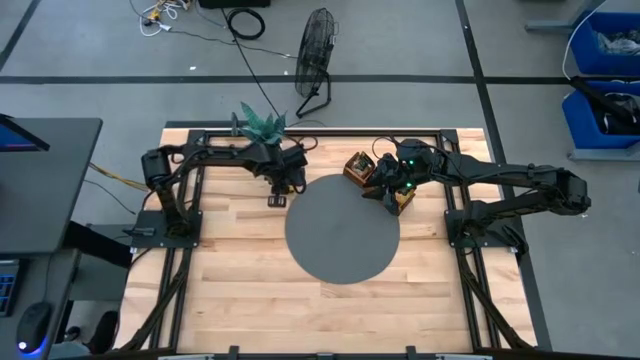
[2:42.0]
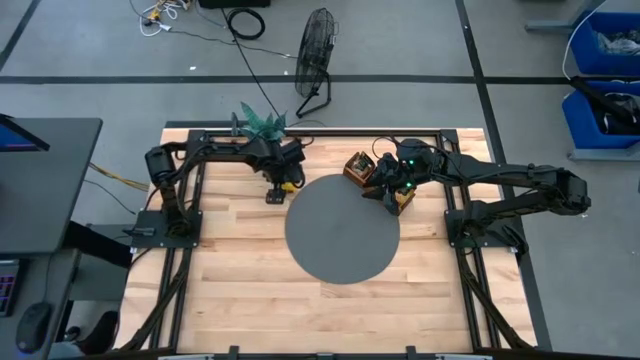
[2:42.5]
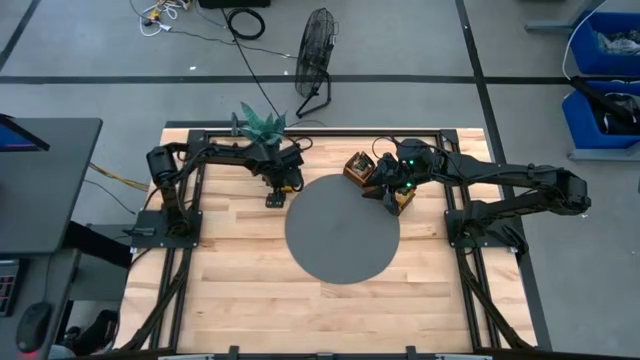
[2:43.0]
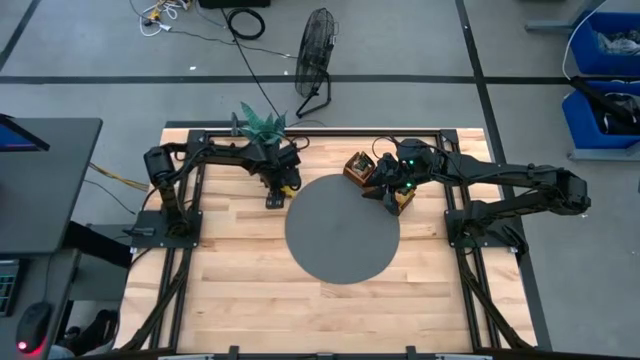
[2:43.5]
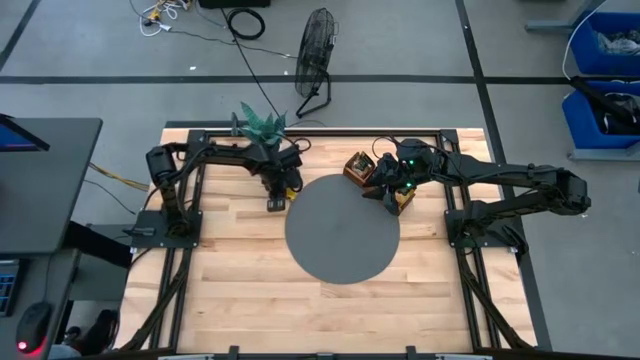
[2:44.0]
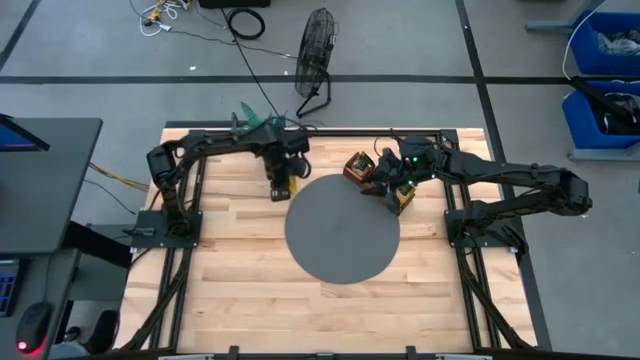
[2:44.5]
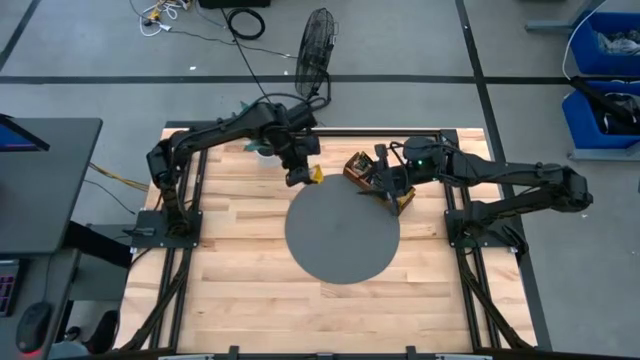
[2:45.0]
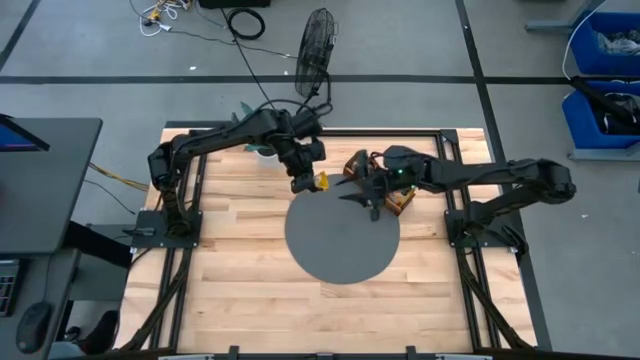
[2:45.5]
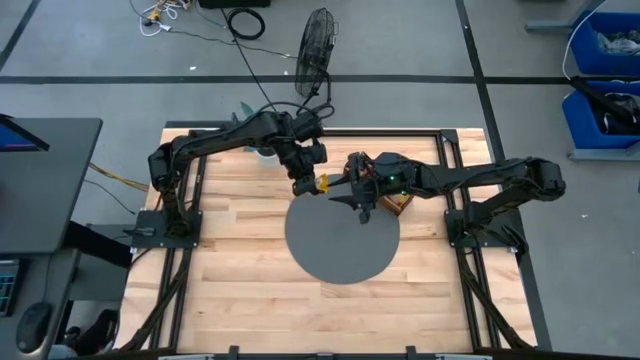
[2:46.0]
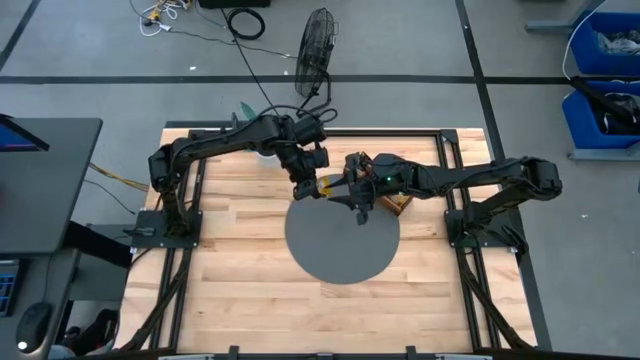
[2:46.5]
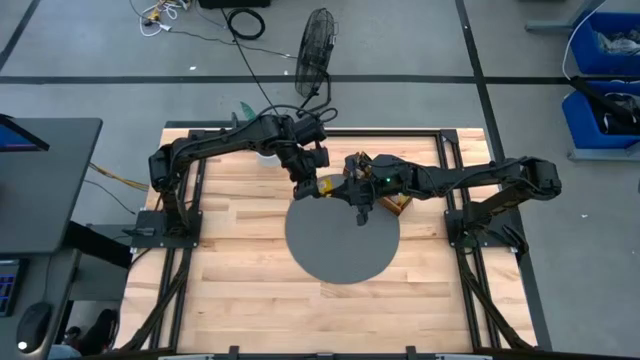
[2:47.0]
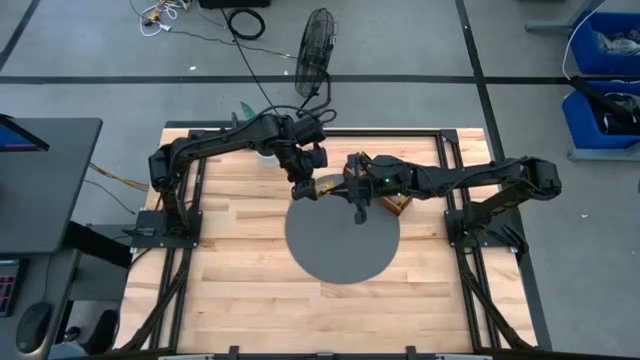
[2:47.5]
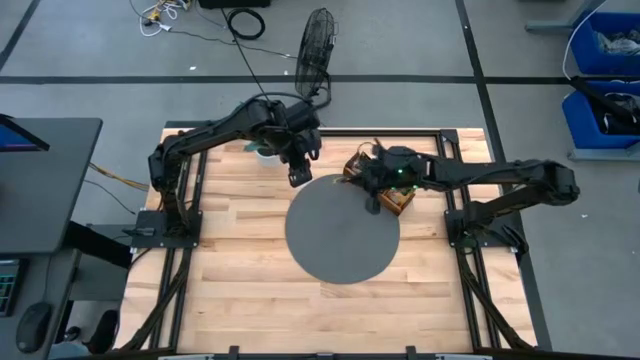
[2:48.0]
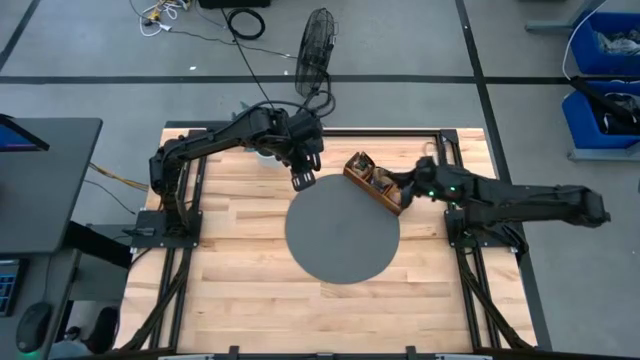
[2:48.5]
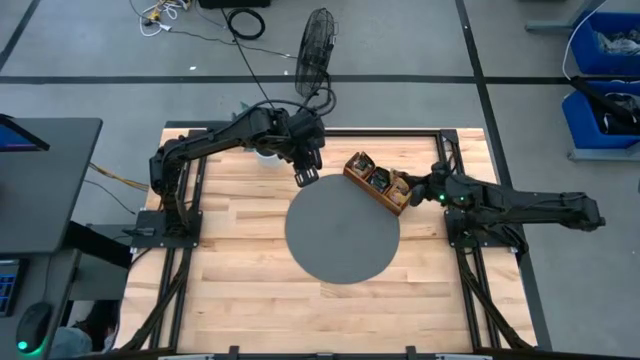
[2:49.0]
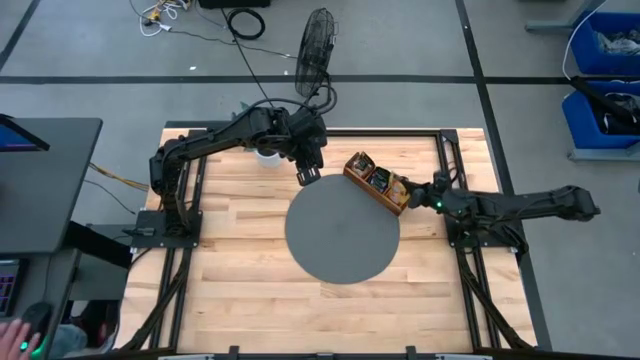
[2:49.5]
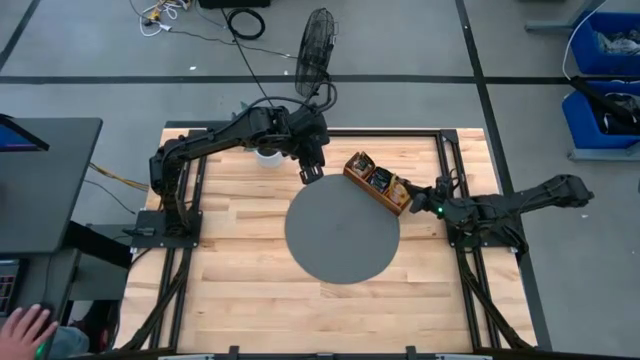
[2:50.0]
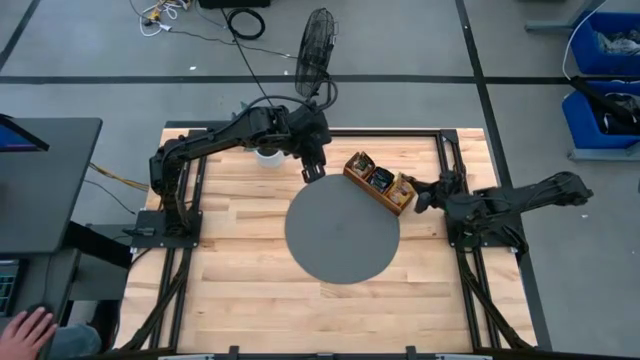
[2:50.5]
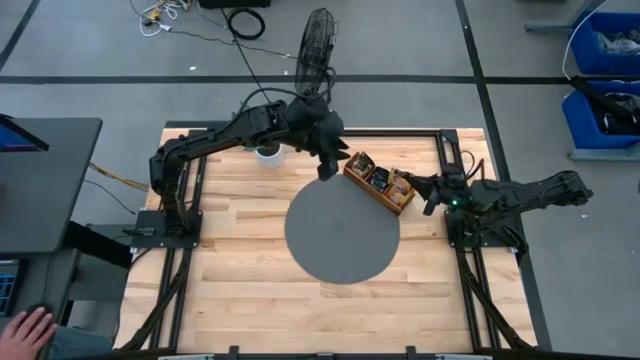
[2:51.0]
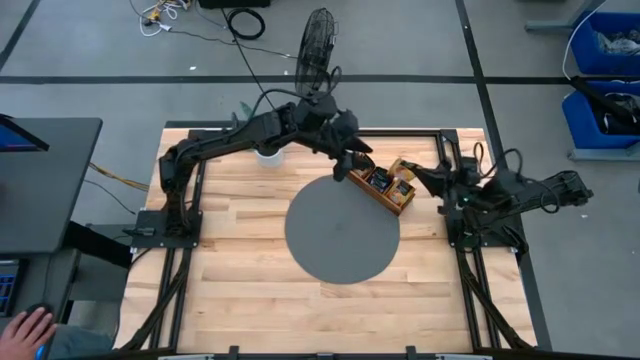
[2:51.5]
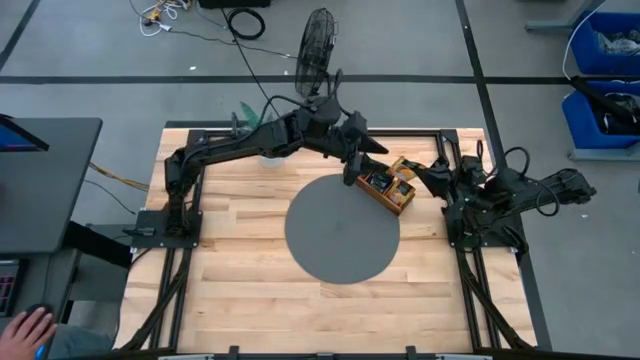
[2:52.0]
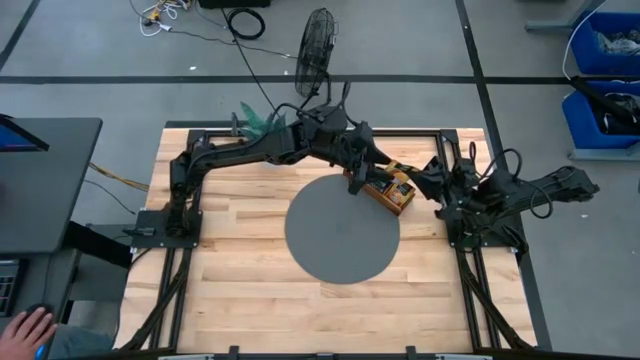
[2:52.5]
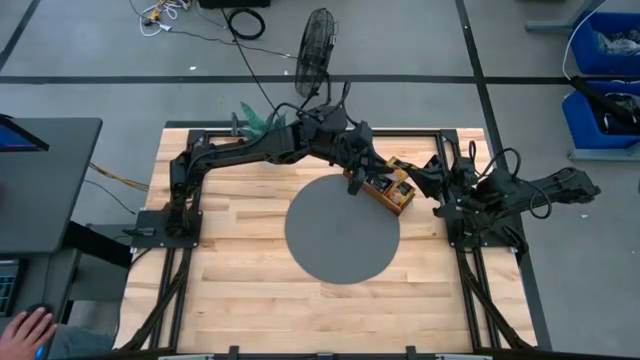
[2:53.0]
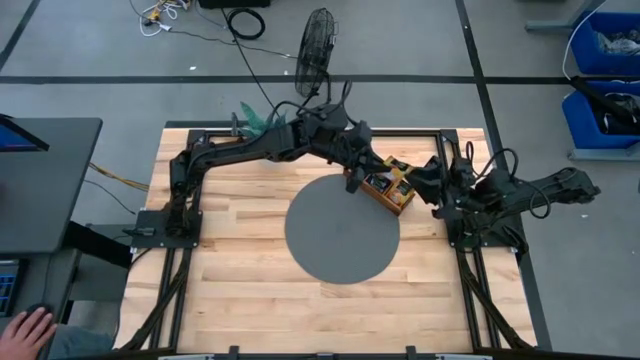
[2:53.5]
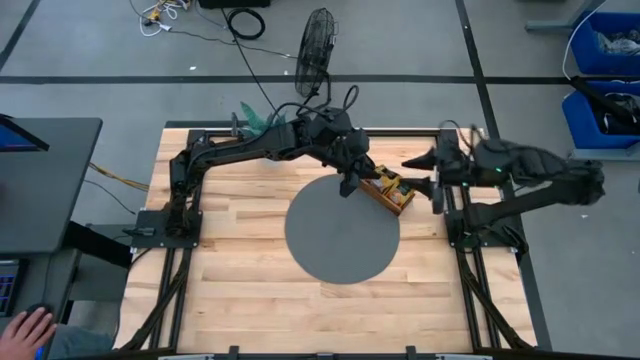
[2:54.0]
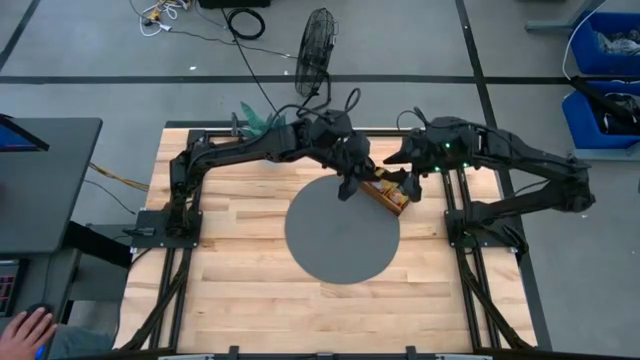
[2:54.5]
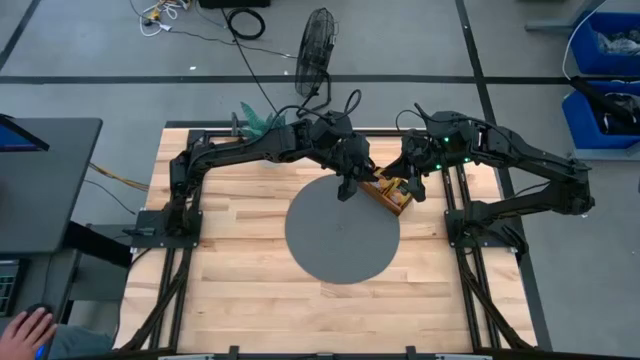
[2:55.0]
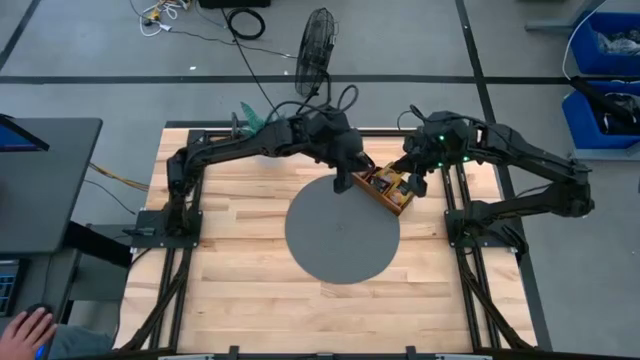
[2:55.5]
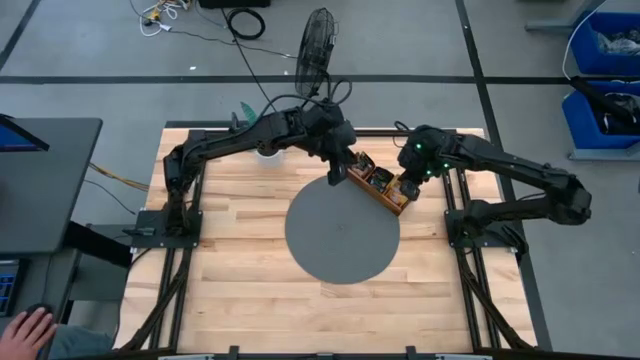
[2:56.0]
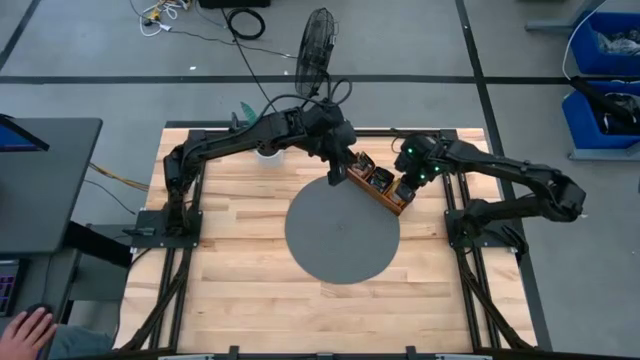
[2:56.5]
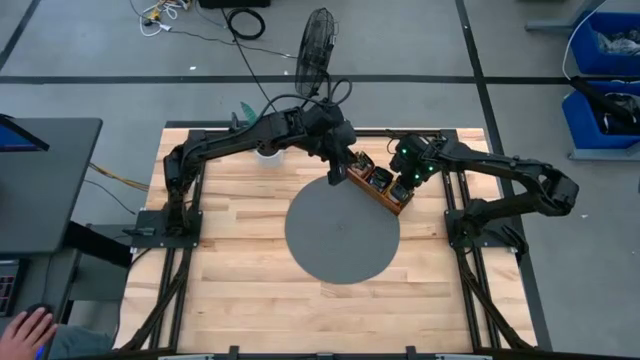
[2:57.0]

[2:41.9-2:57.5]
Task: Pick & Place Tea
Put the yellow tea bag into the right section of the wooden organizer

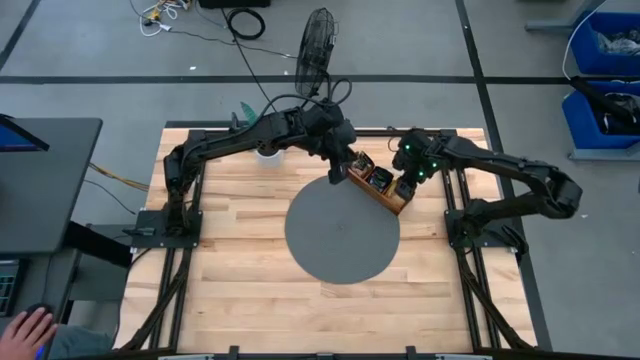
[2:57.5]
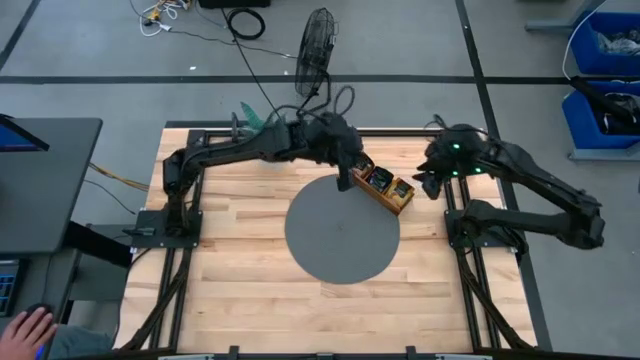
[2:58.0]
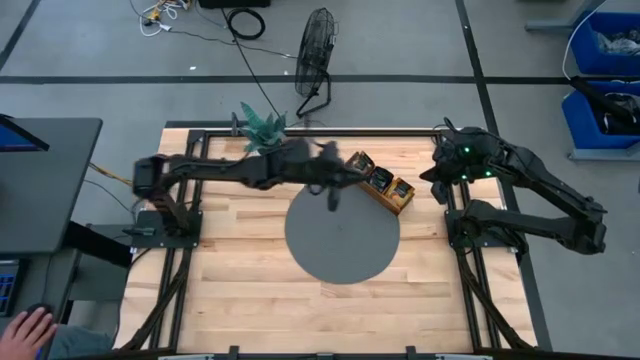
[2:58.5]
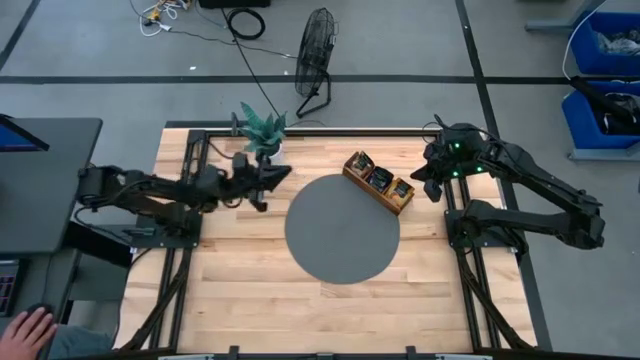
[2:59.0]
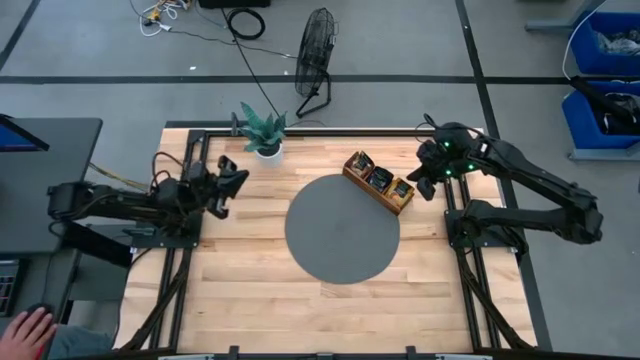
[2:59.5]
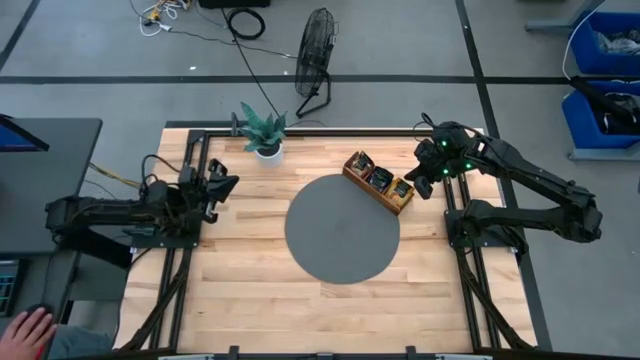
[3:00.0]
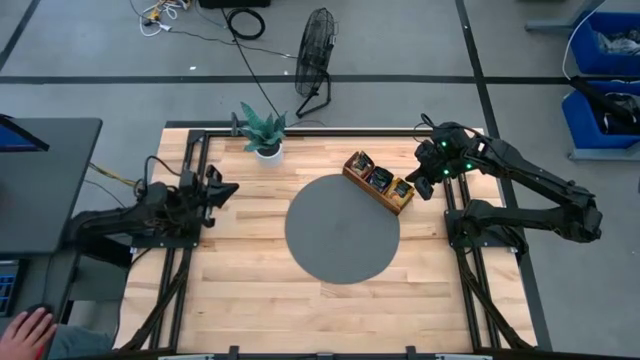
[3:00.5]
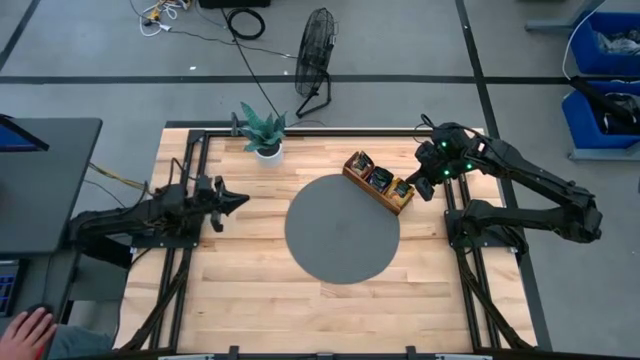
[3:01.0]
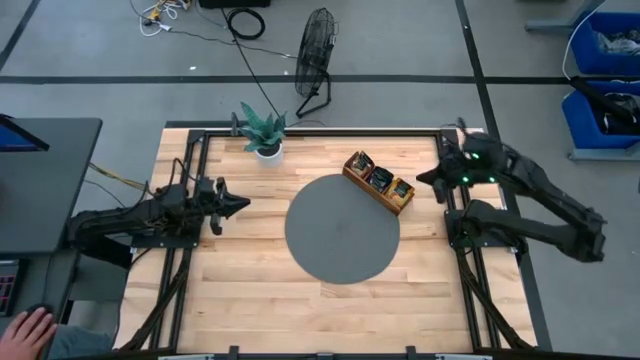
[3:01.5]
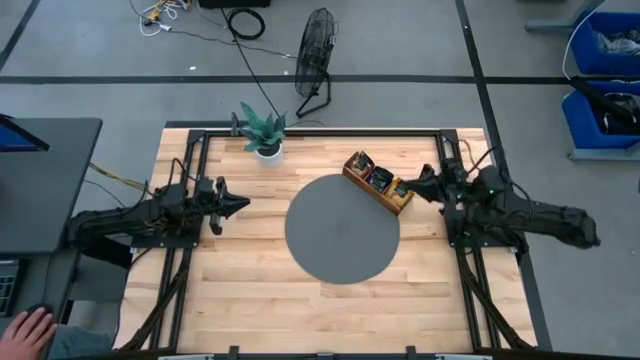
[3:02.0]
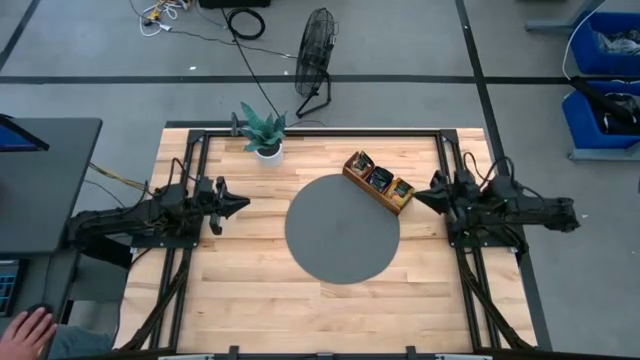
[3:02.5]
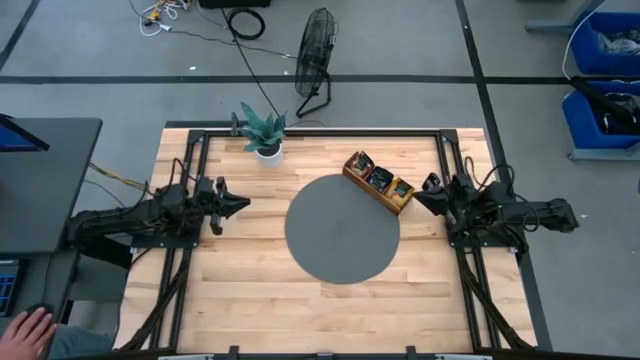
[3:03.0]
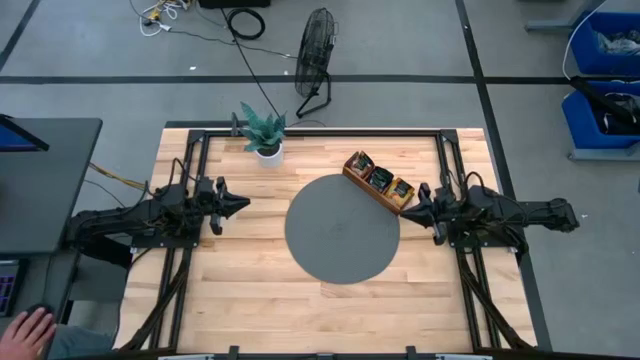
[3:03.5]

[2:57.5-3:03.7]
Return to Home Position
